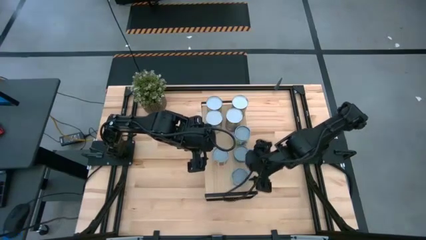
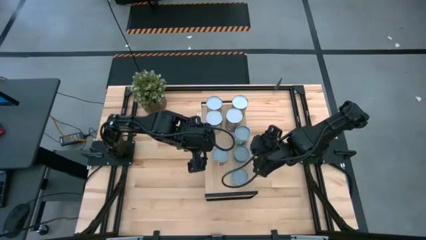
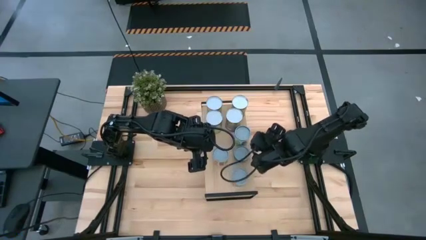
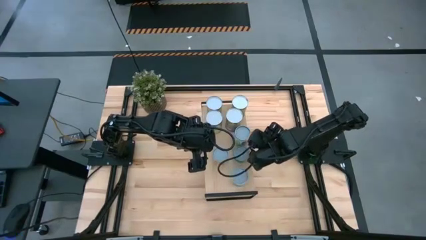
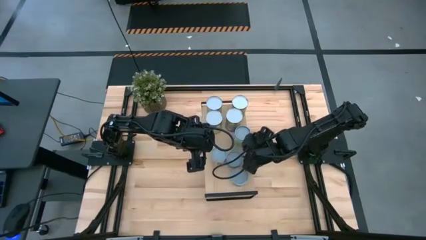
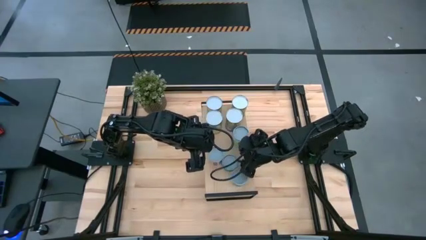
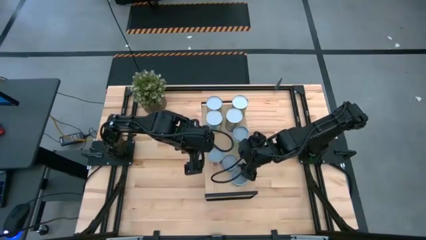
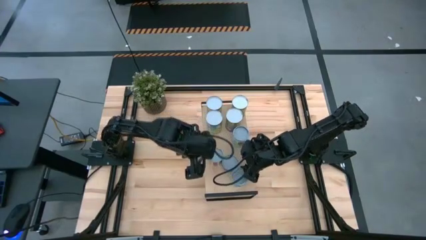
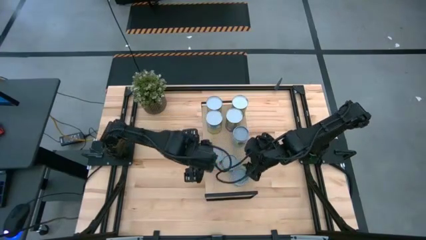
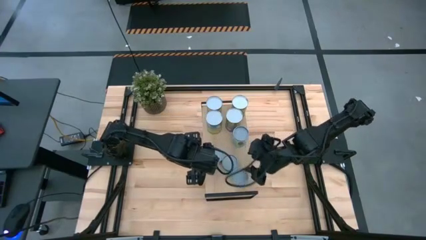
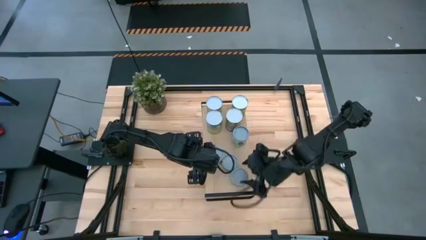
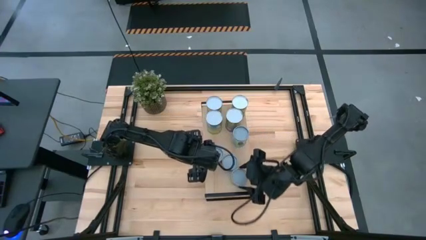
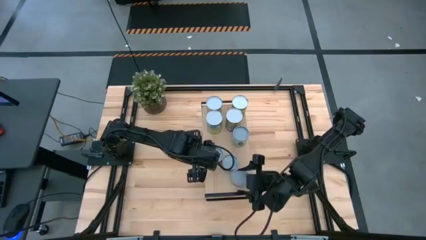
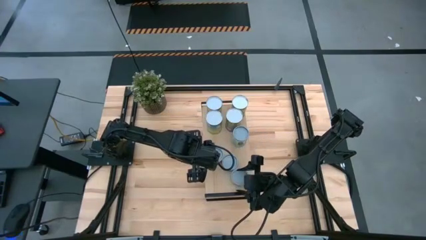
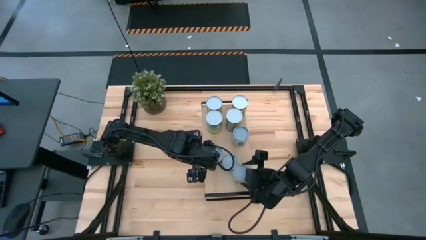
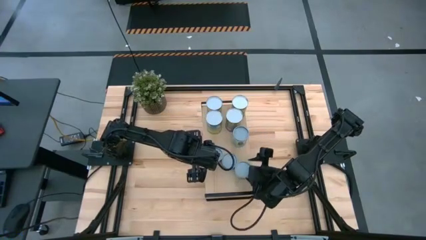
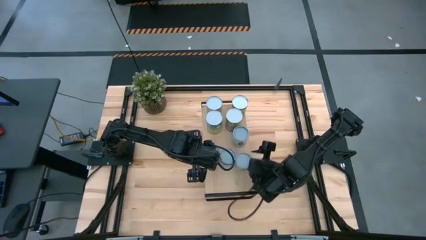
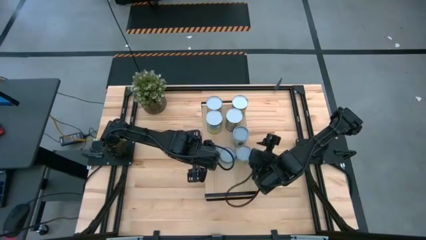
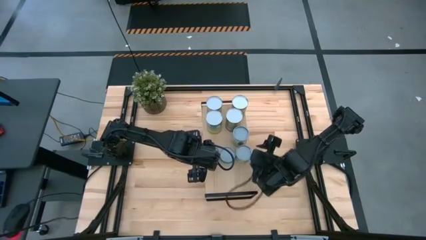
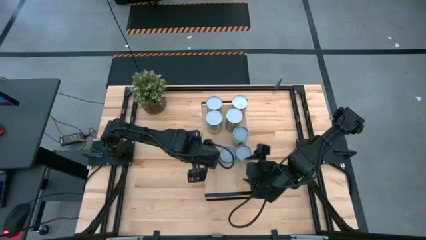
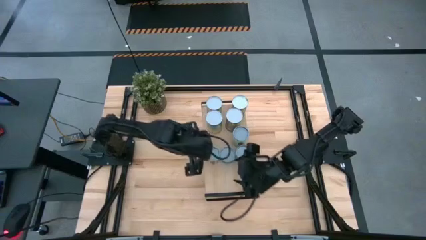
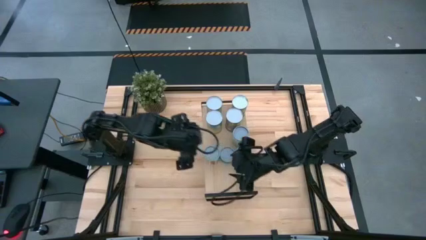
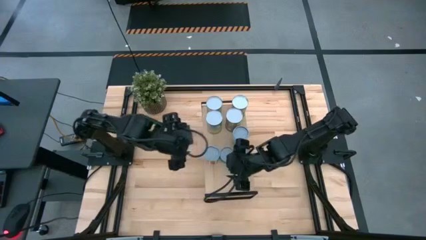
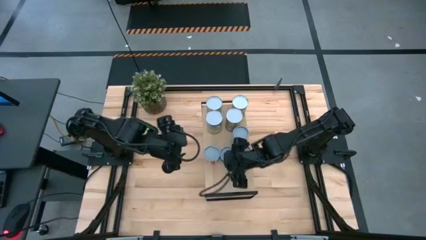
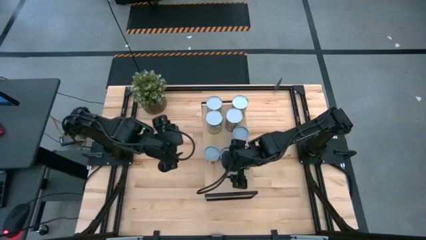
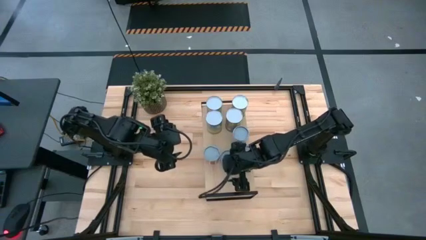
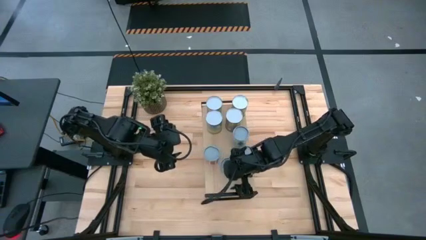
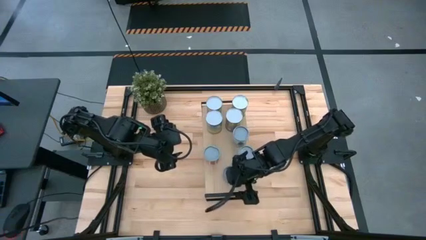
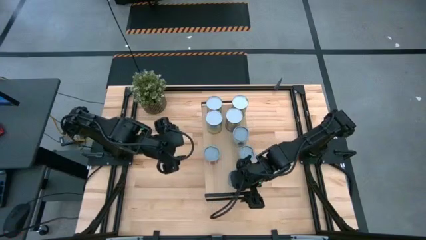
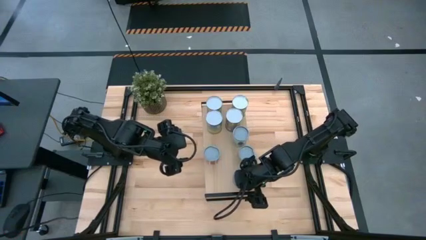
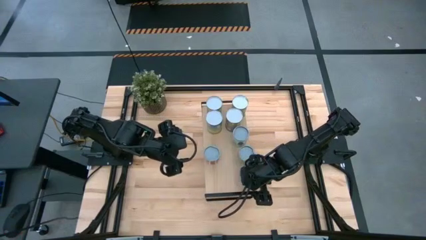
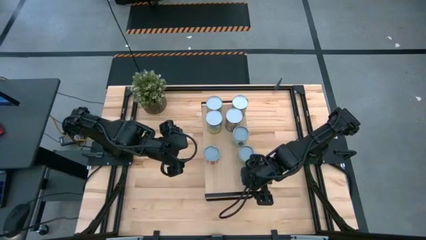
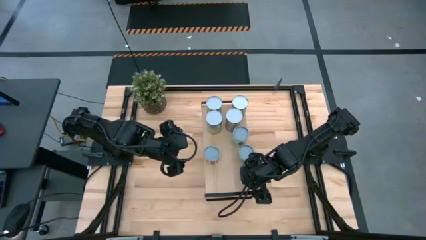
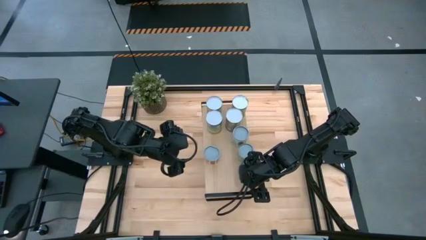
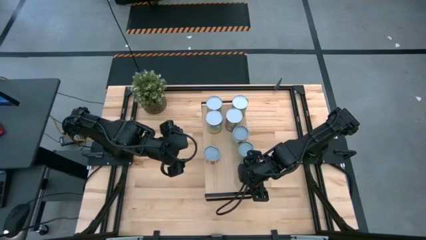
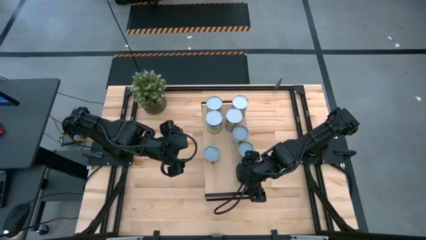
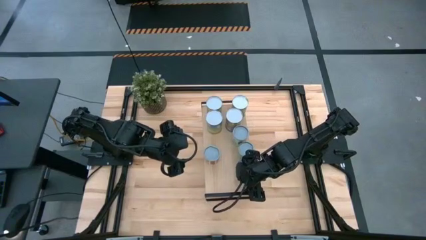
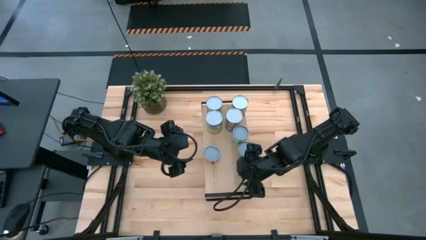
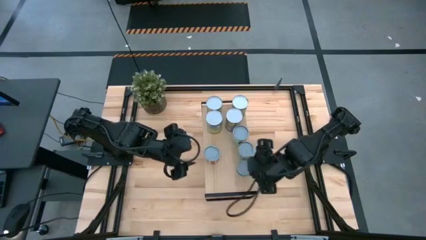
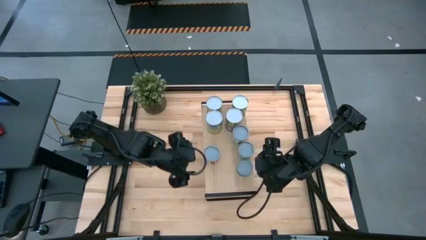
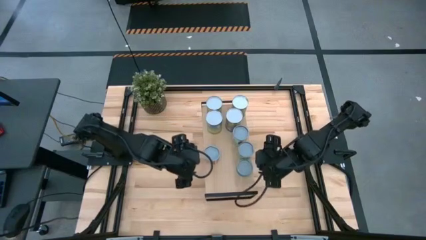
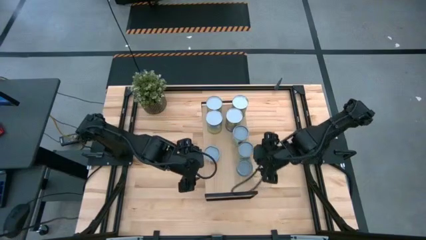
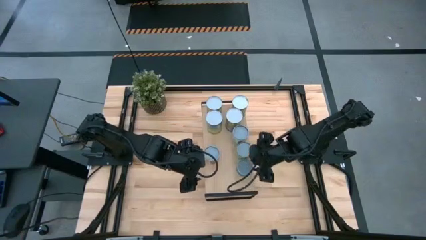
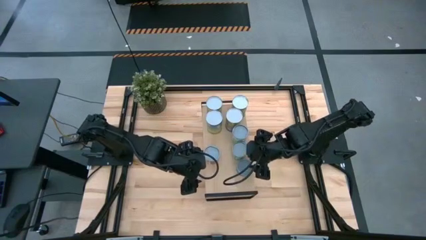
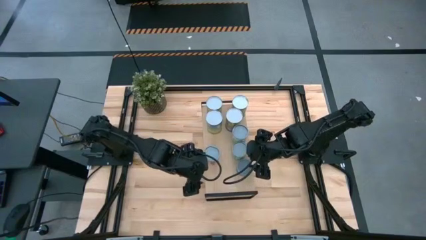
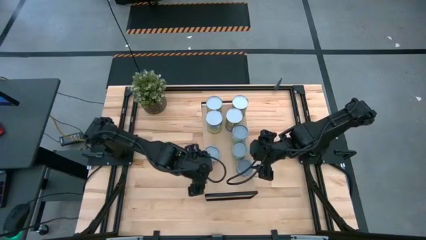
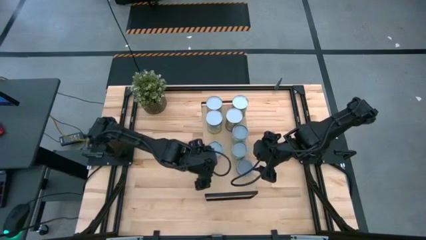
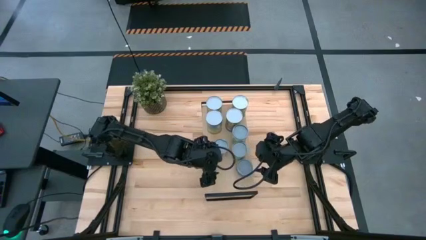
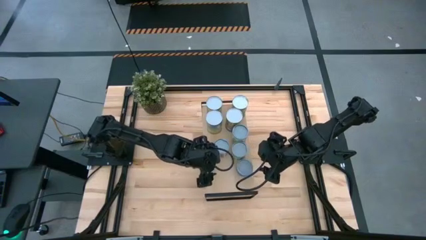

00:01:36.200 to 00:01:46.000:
Task: Pick and place cans onto a shelf
Adjust the cans on the shelf

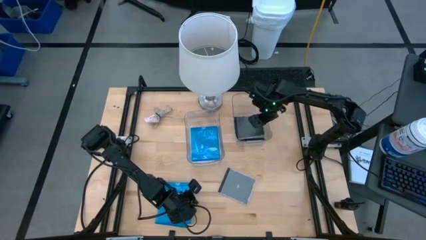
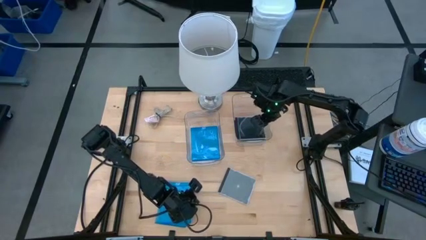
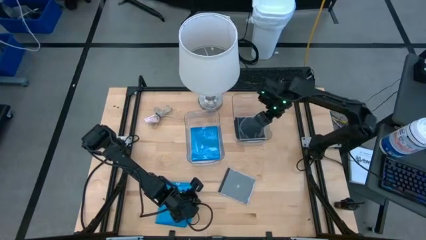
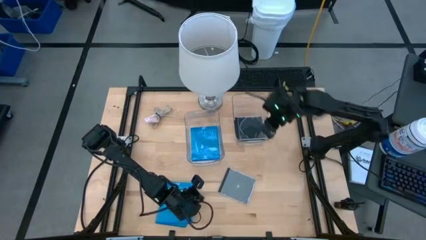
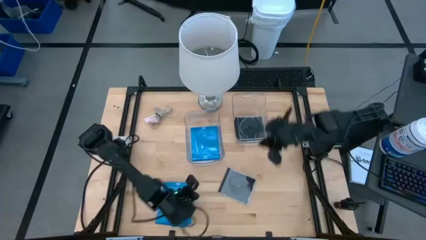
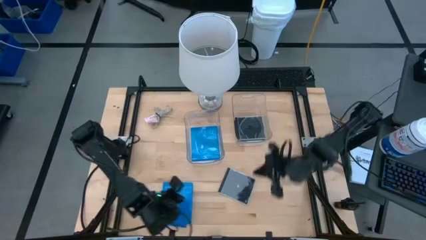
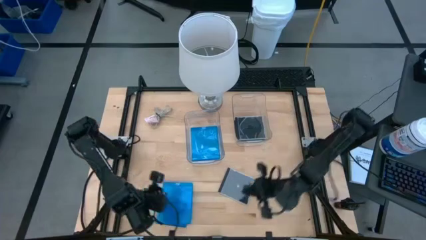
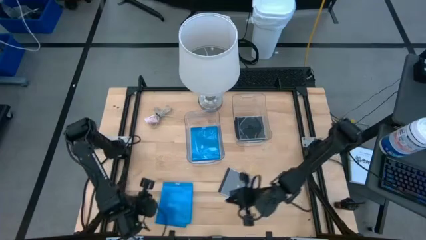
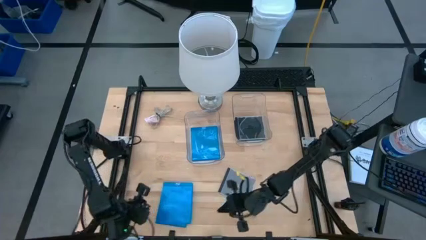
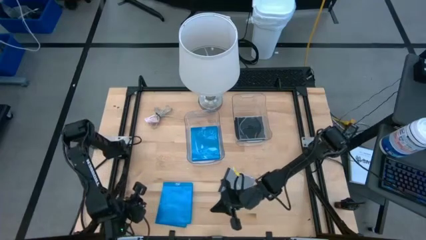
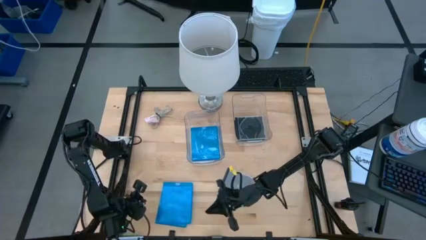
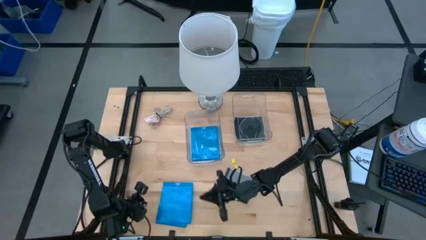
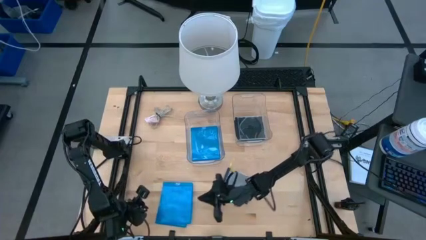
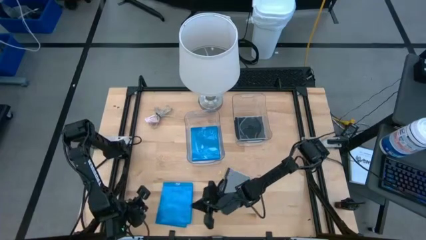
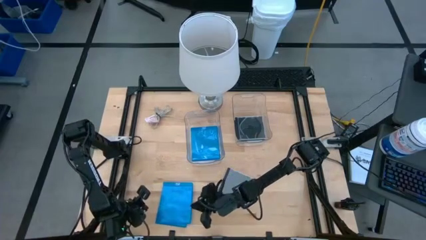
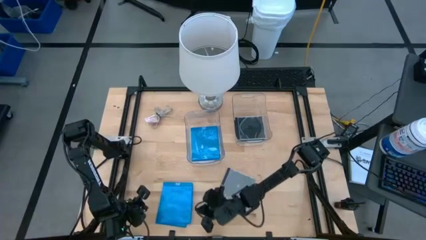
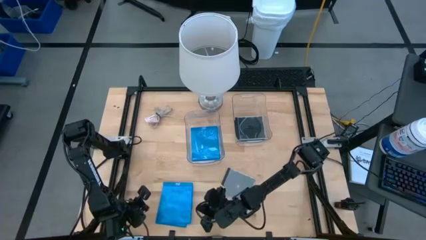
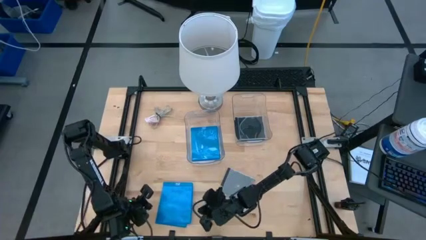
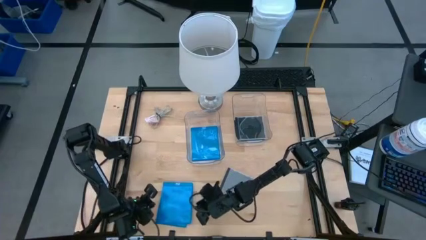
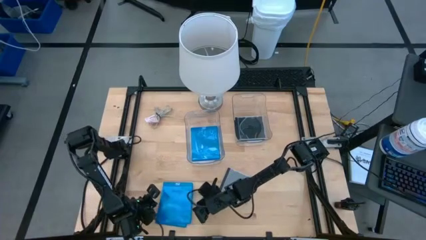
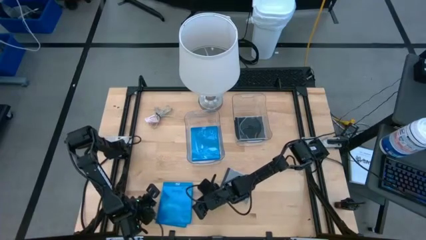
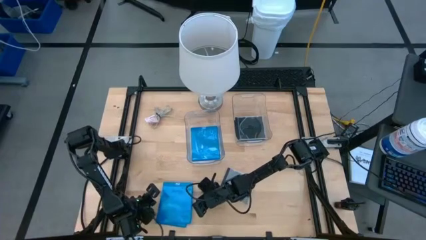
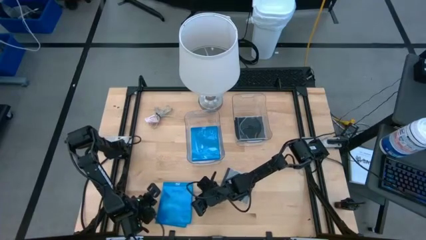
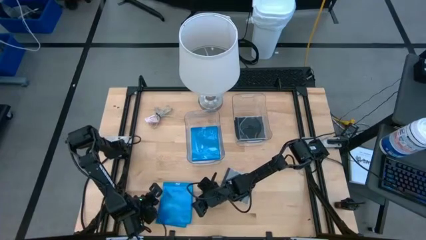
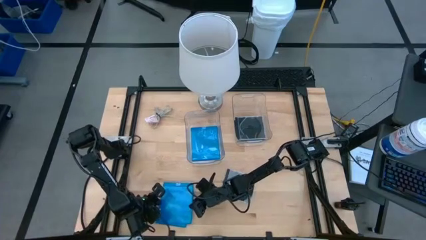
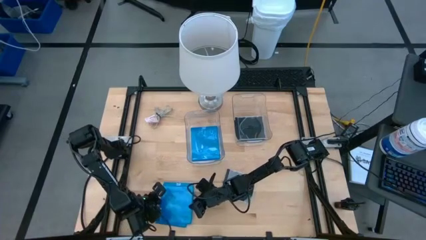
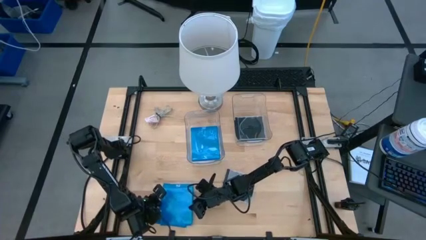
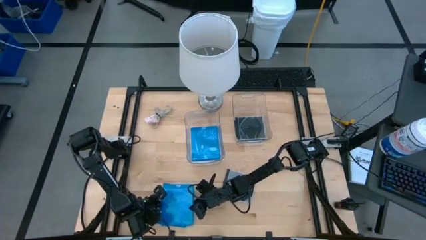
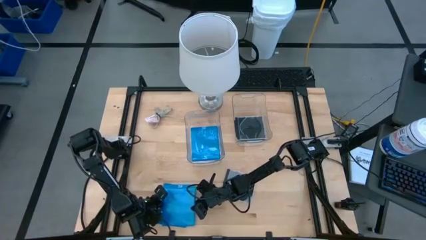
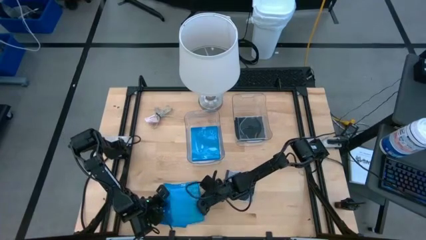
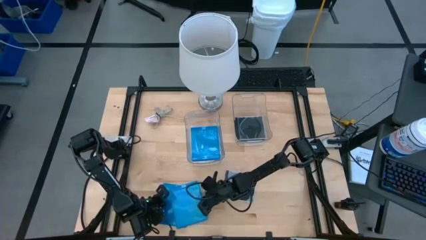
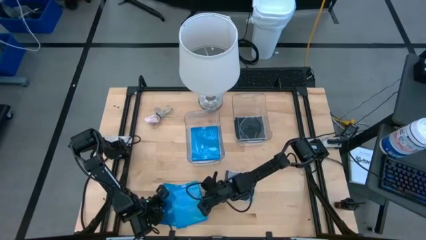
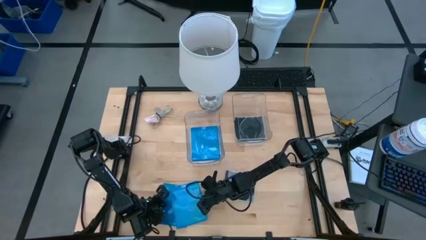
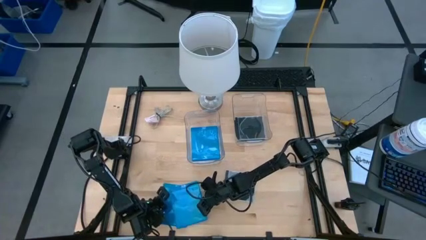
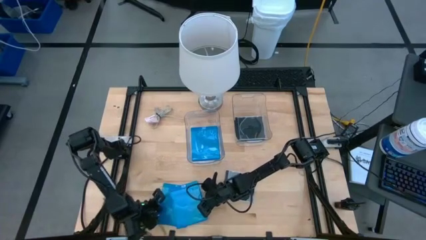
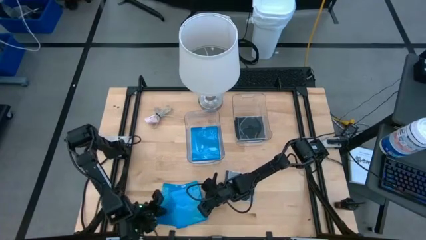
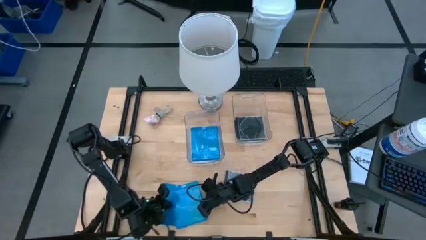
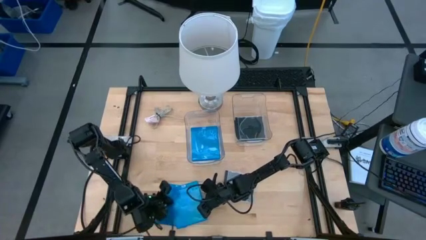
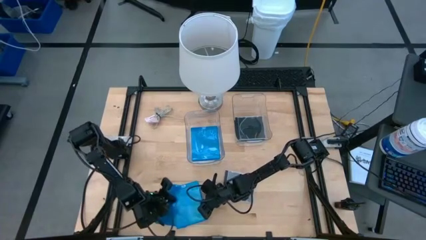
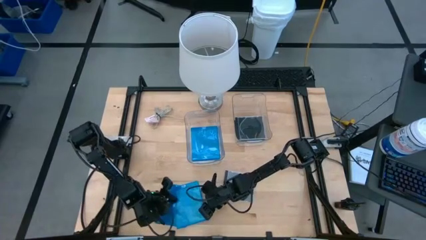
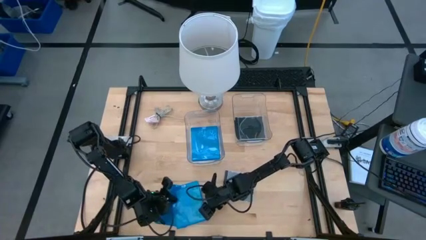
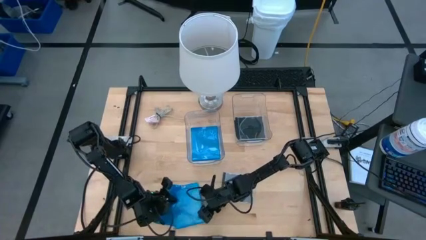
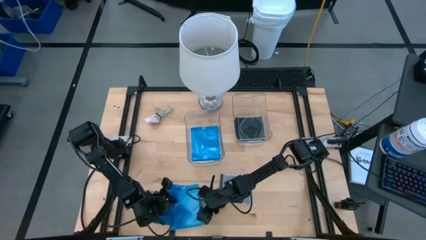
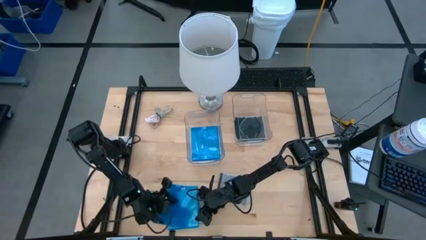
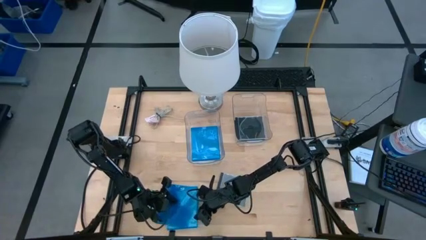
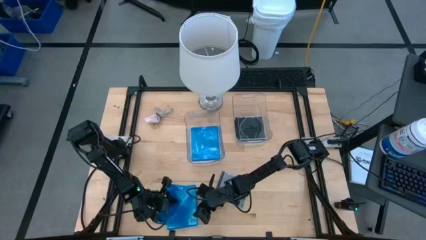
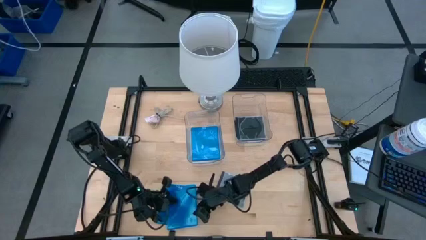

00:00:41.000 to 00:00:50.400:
Task: Pick & place jewel cases by type
Put the blue cd case into the left transparent bin
